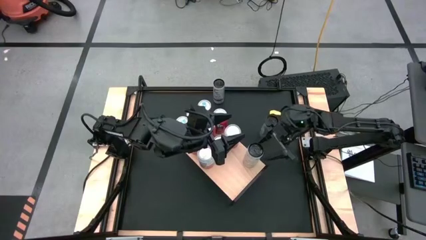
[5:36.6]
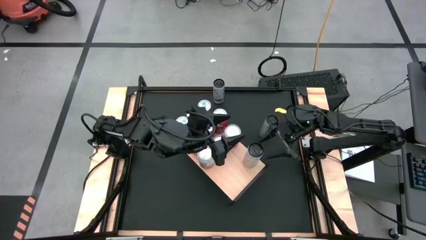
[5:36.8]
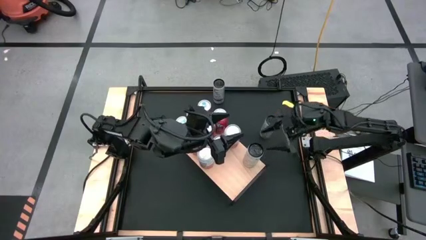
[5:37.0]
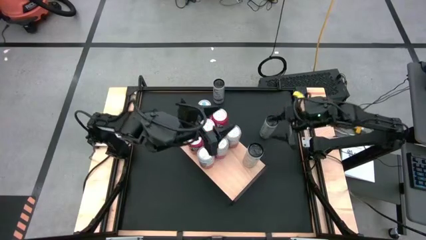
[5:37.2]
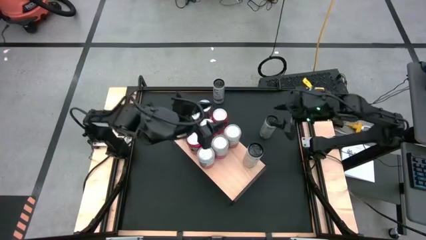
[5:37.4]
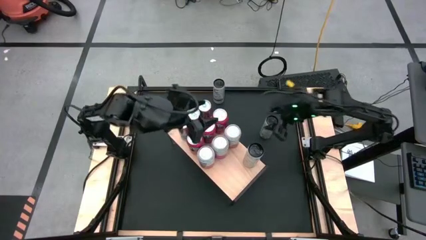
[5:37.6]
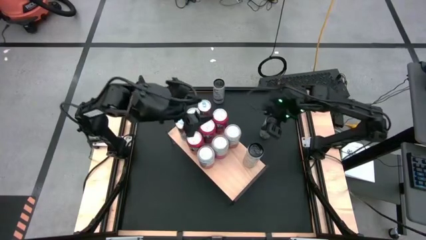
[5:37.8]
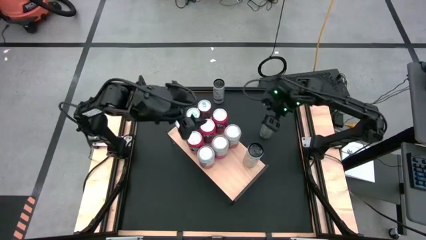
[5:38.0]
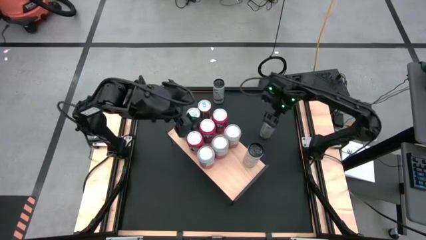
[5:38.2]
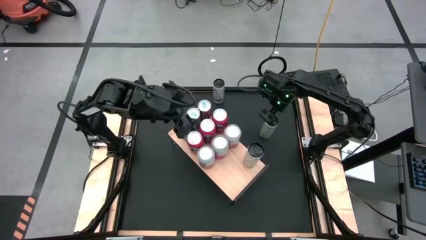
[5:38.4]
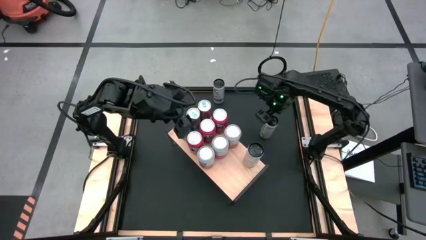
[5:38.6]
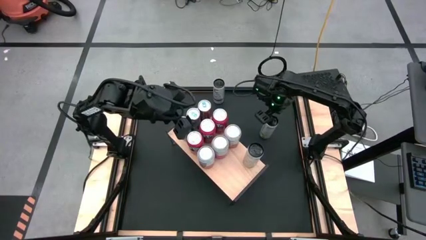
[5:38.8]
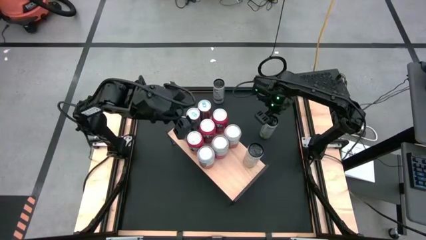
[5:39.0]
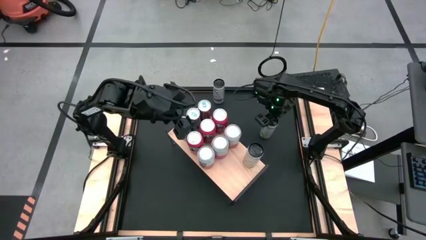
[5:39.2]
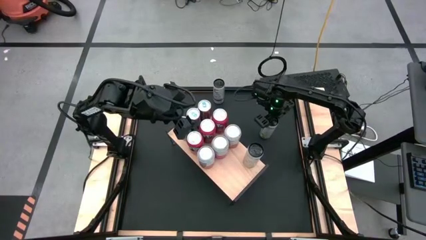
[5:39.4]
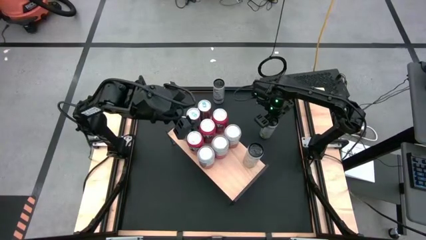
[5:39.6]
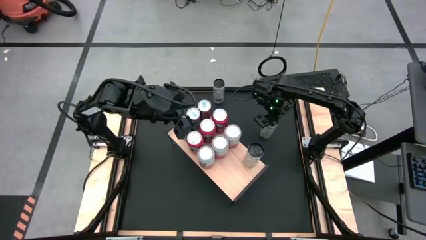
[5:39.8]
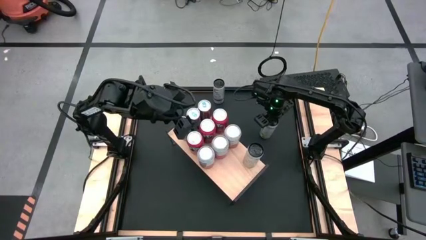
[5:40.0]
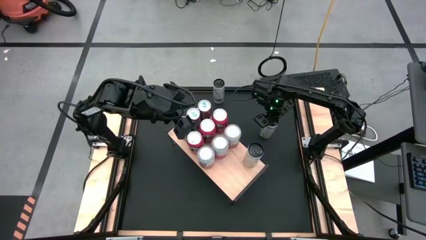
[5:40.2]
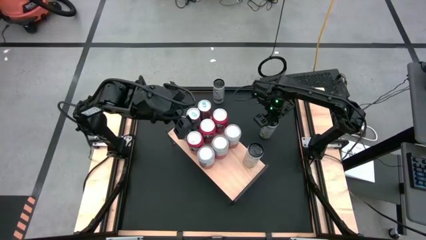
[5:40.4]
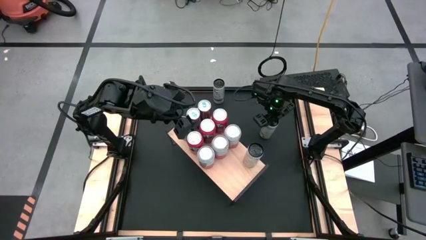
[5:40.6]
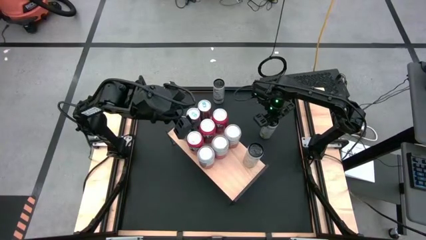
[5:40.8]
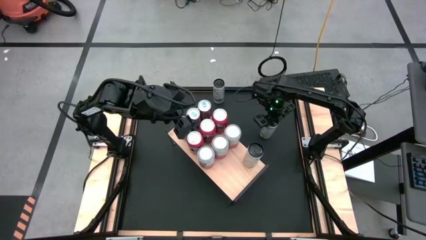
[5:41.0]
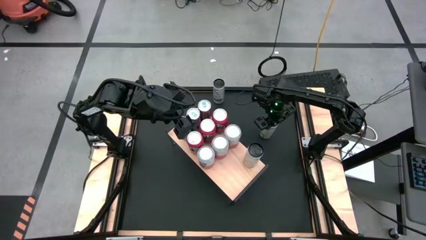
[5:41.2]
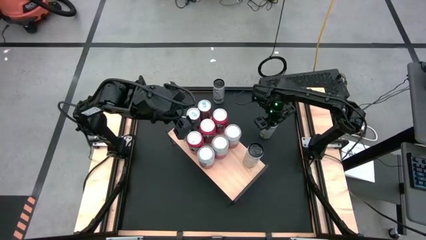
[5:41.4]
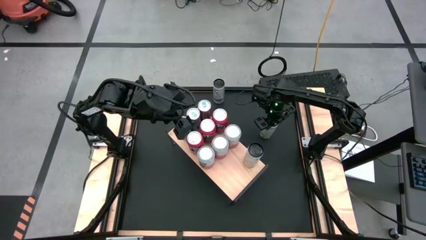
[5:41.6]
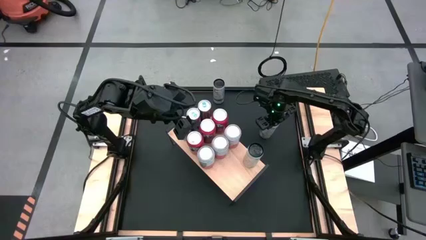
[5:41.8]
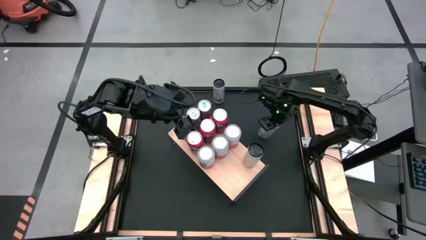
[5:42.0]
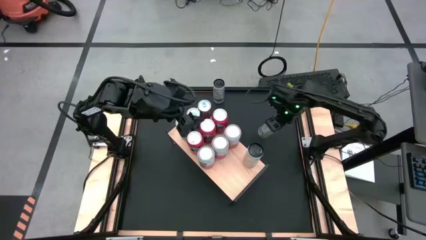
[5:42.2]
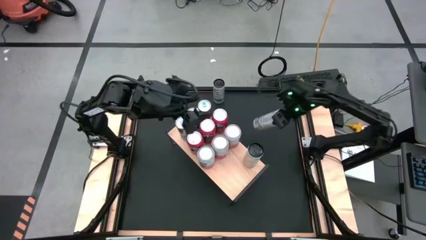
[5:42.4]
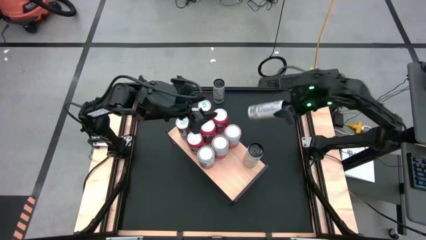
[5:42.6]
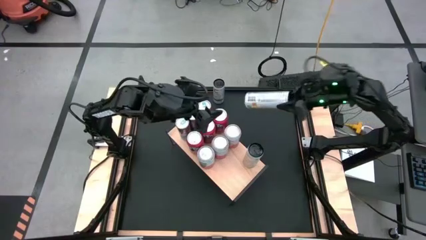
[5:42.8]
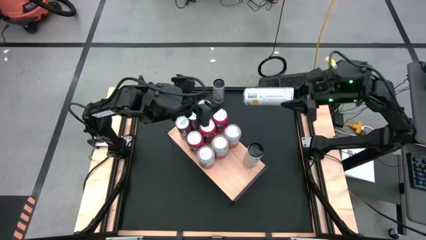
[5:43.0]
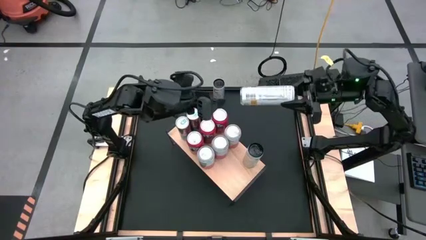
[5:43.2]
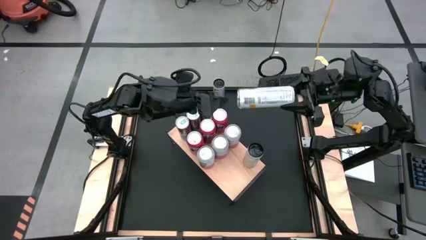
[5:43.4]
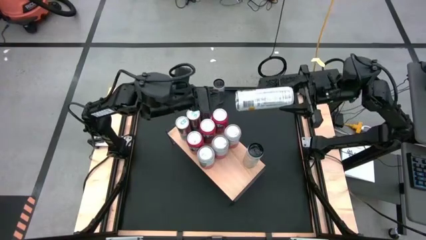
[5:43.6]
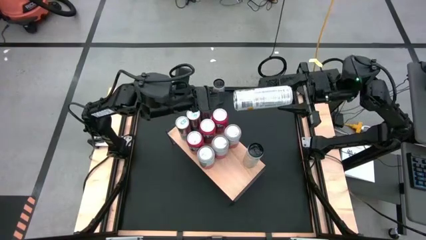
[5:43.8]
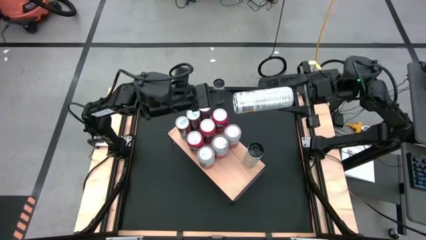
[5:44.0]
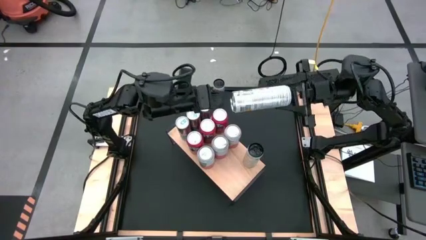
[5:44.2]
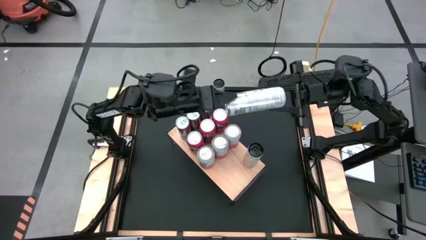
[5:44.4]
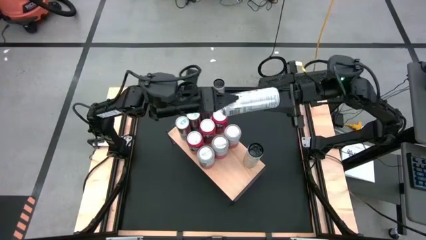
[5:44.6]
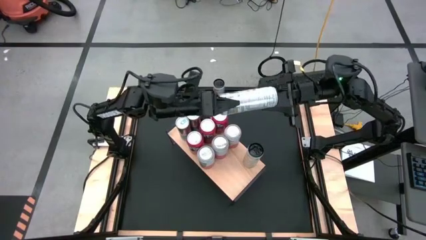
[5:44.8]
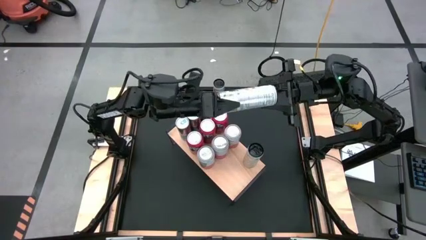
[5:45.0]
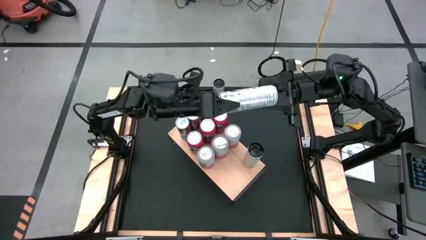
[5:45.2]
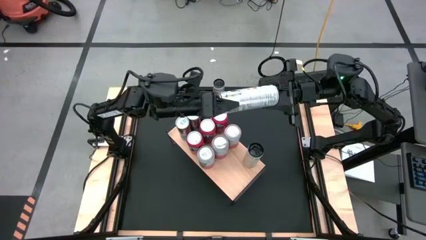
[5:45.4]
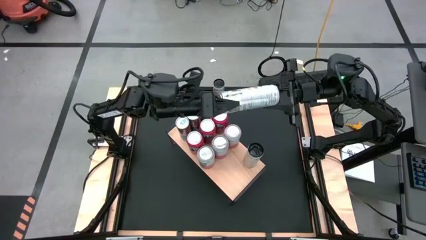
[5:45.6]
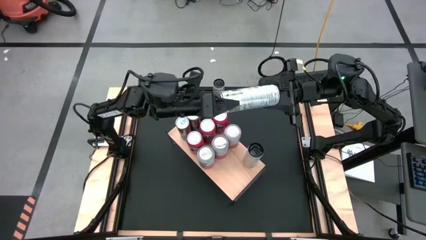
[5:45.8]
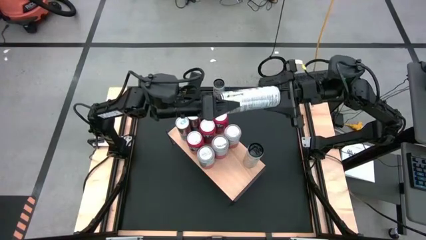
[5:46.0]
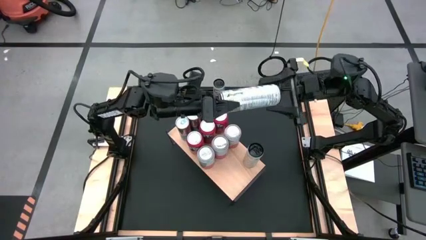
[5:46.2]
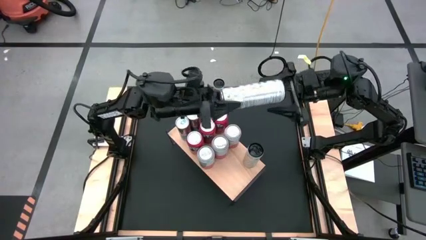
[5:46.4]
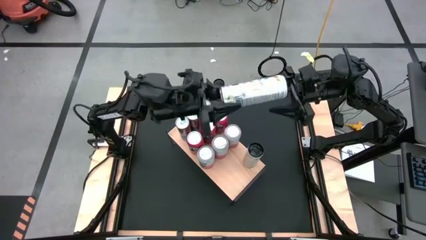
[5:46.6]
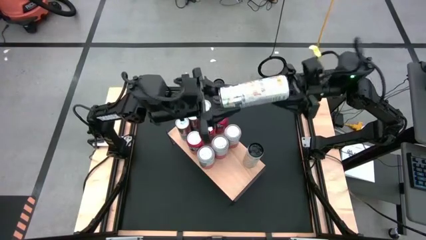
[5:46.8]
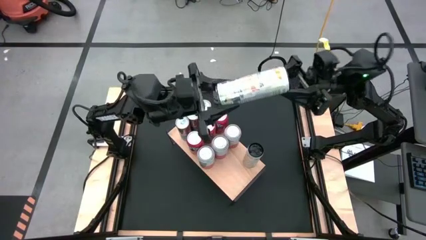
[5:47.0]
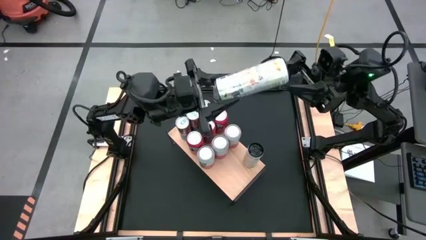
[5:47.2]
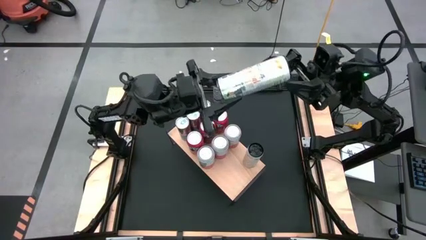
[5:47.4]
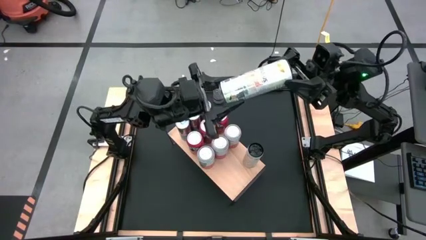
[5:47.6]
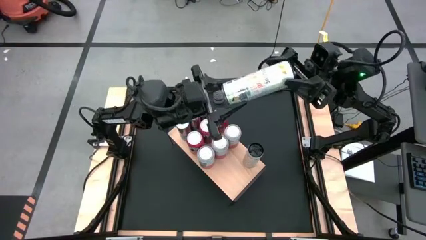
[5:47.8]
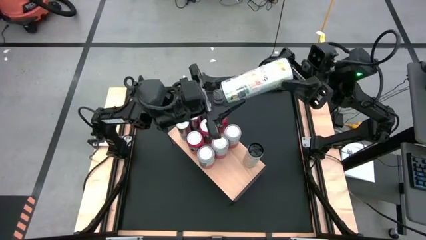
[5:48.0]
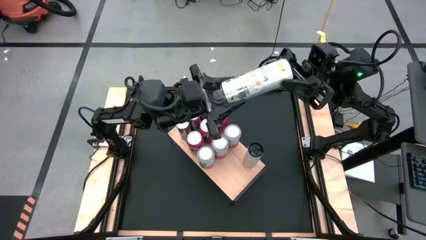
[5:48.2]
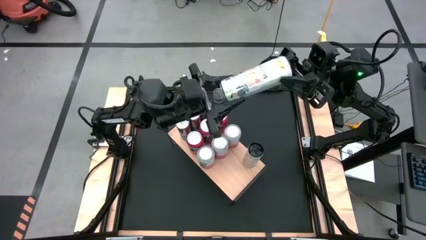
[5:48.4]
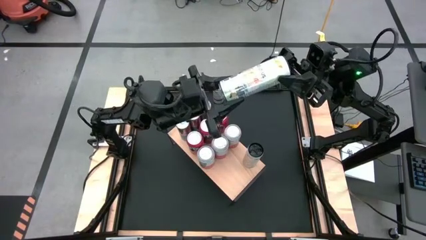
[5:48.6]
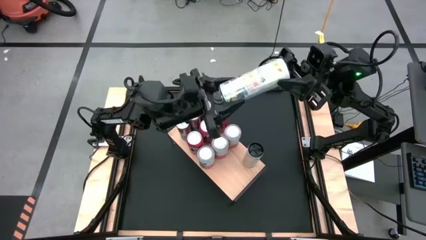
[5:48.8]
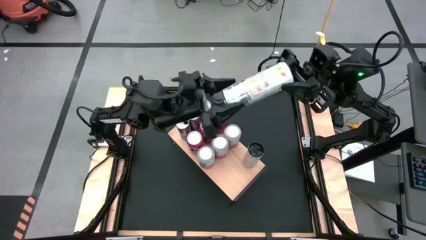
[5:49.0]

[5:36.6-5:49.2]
Task: Place canned beverage on shelf
Put the bottom white soda can on the shelf aligned with the other white soda can

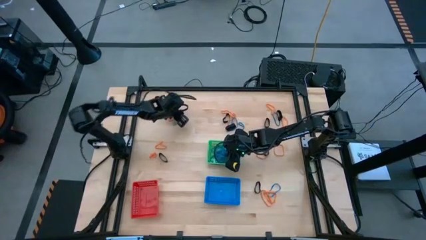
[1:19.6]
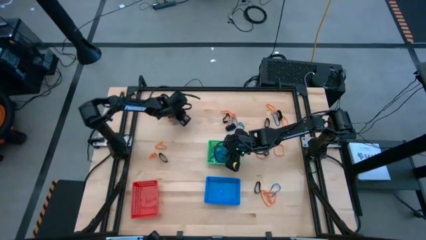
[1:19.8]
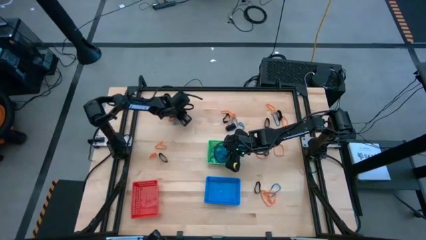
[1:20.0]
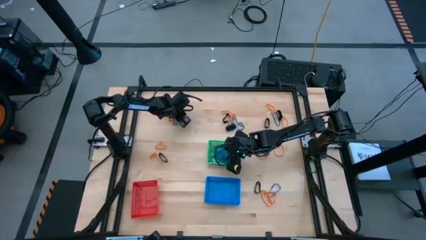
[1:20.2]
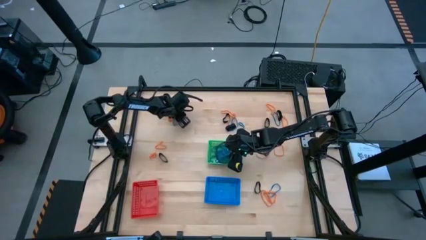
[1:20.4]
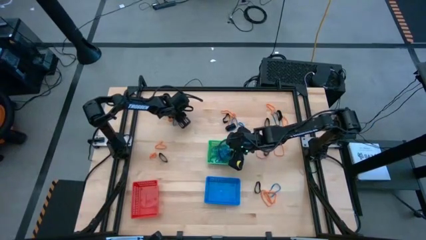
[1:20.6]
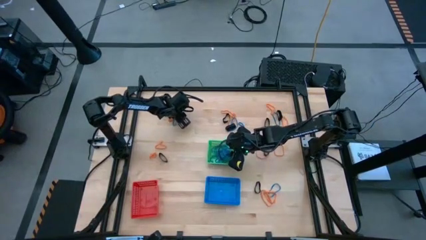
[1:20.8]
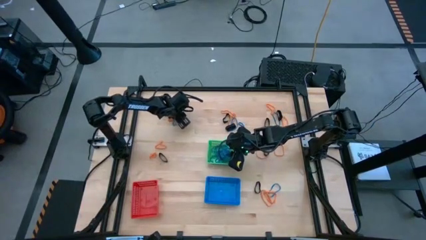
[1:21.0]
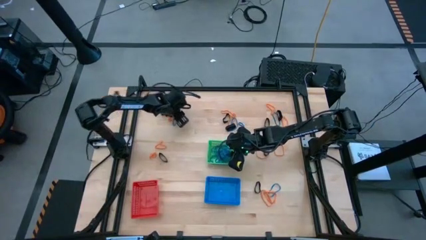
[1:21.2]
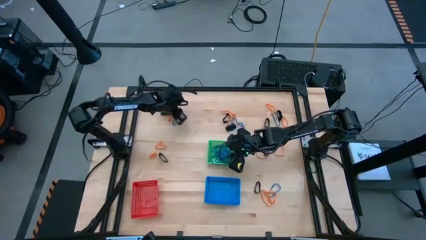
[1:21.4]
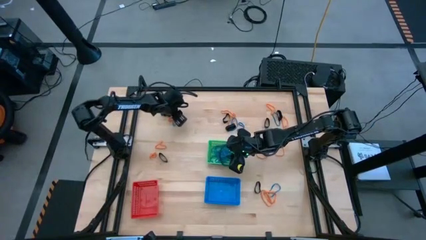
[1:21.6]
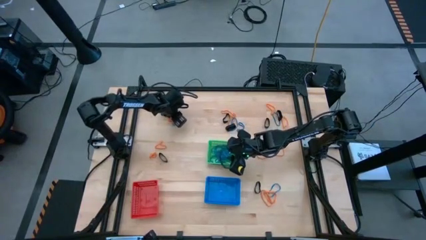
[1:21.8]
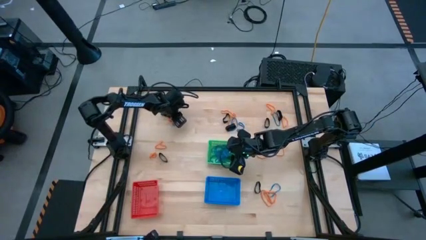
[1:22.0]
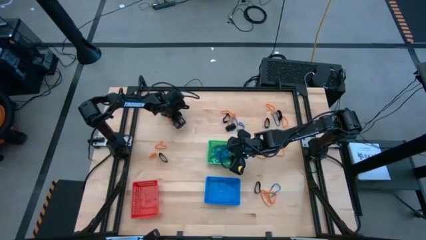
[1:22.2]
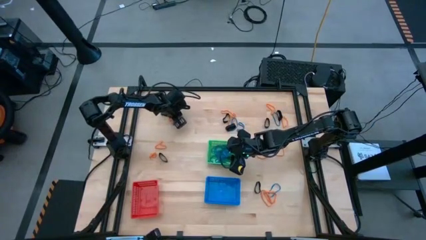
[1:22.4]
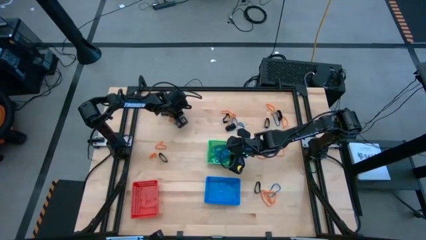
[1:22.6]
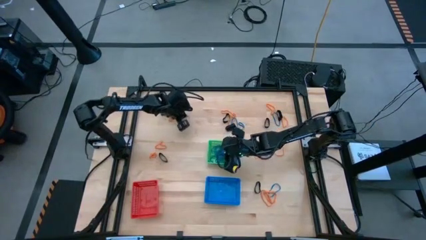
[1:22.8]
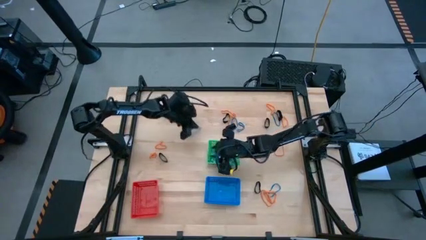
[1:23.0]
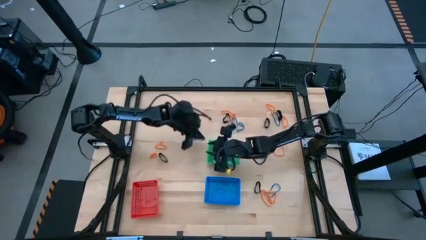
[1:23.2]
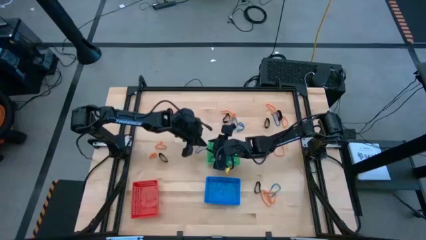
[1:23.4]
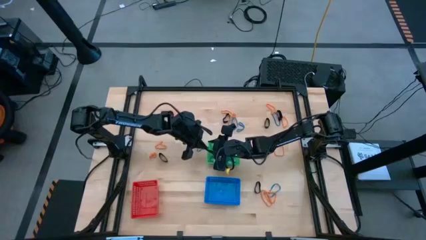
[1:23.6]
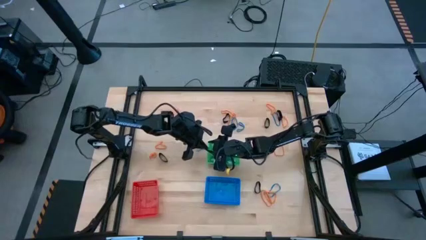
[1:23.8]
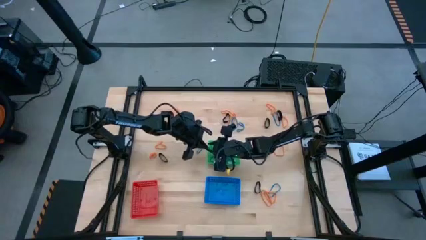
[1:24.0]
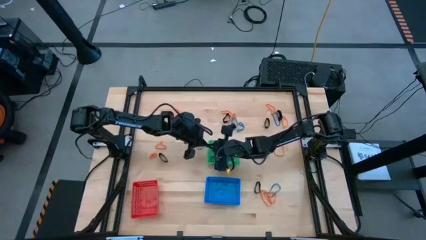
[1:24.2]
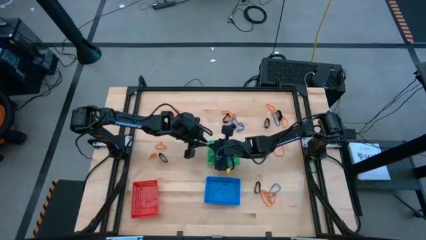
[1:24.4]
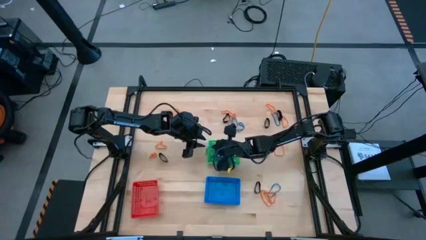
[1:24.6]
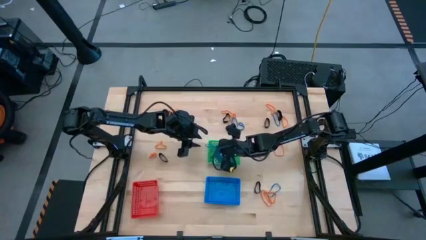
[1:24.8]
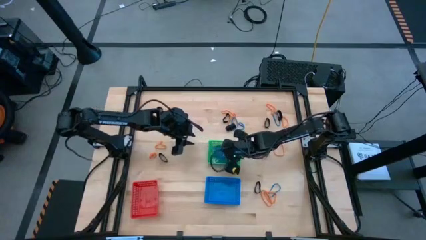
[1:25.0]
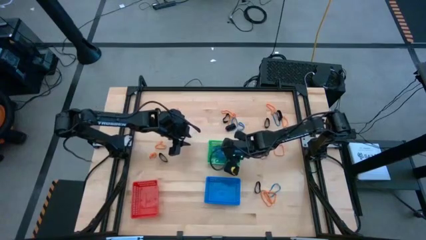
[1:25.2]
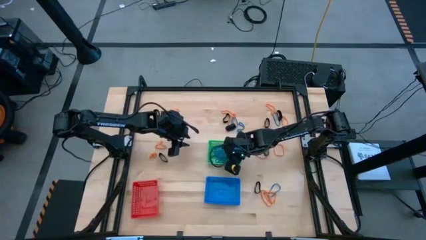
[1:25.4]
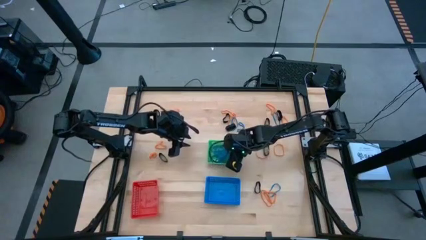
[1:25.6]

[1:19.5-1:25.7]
Task: Sort rubber bands into baskets
Put the blue rubberband into the green bin
